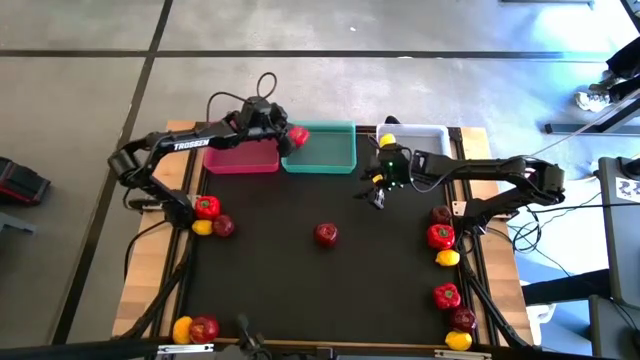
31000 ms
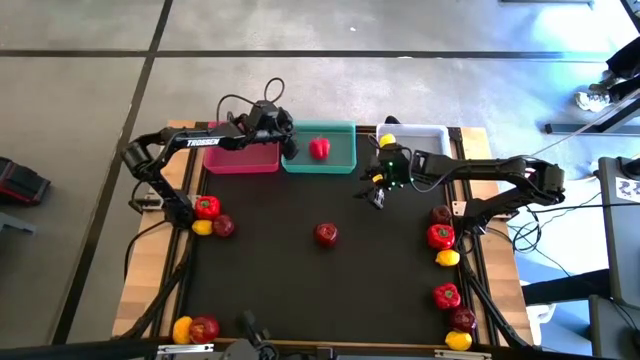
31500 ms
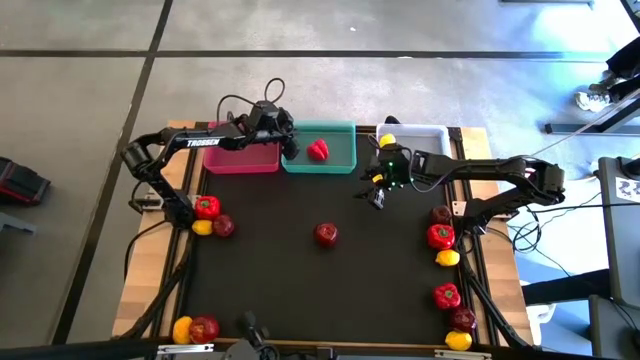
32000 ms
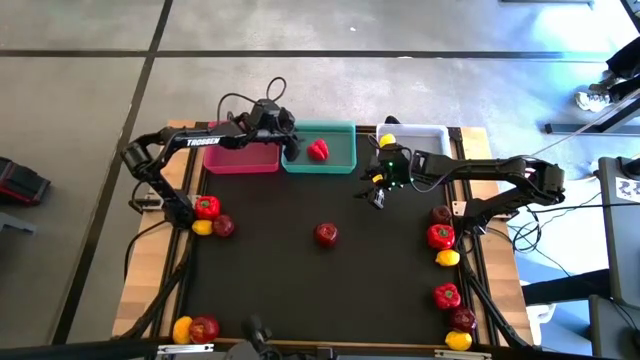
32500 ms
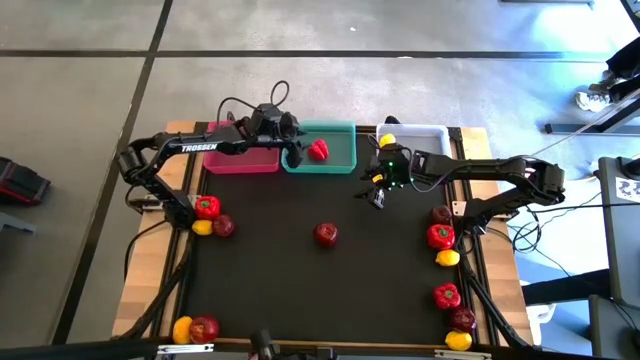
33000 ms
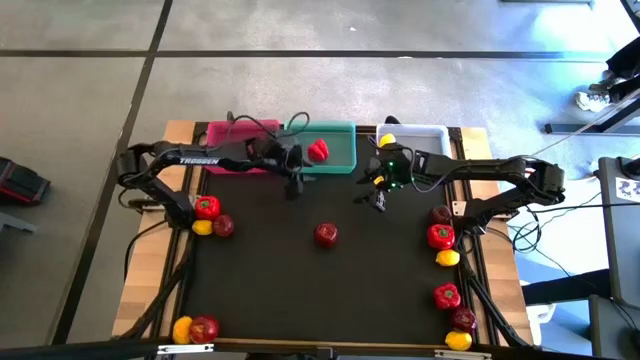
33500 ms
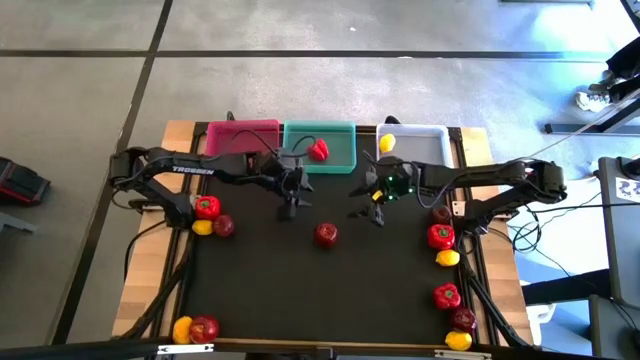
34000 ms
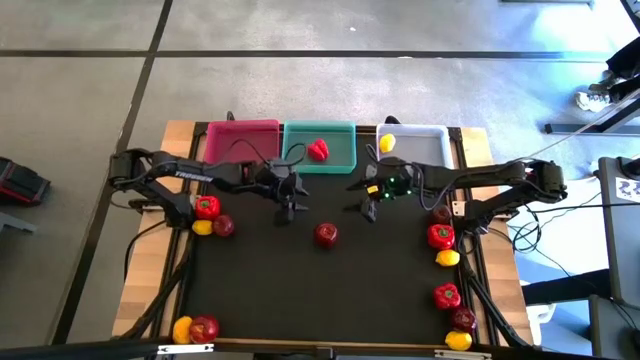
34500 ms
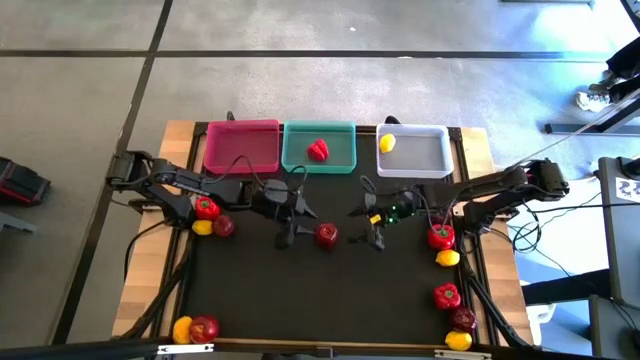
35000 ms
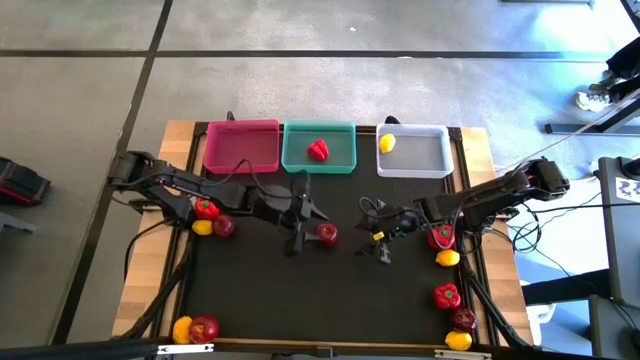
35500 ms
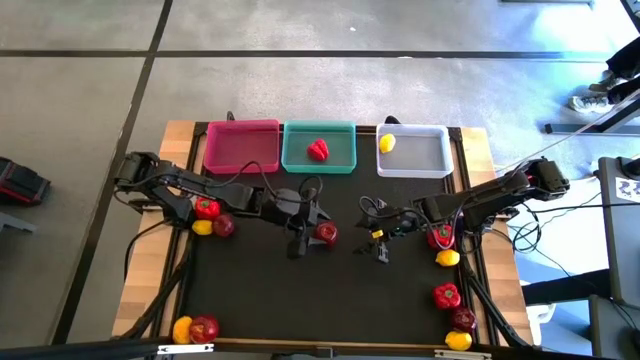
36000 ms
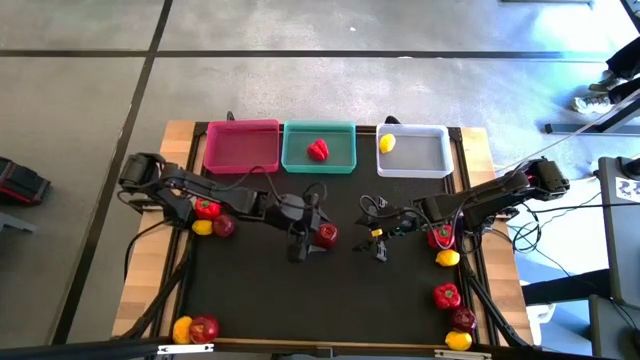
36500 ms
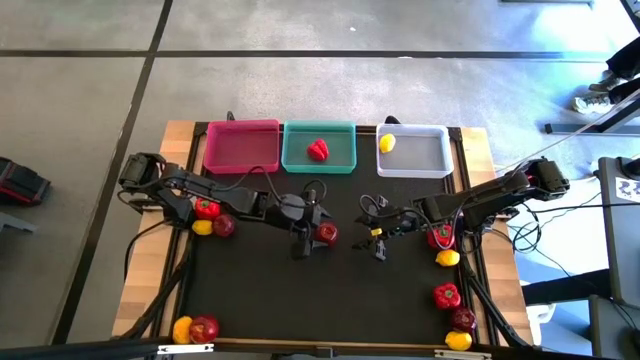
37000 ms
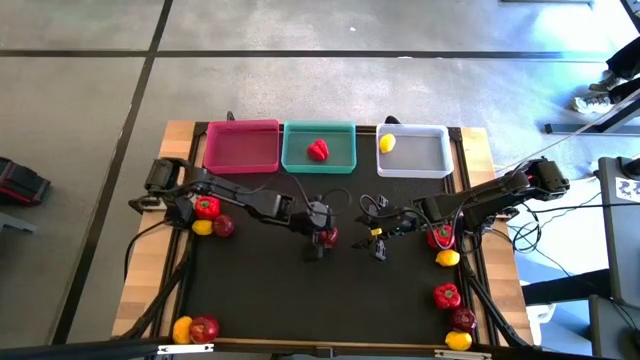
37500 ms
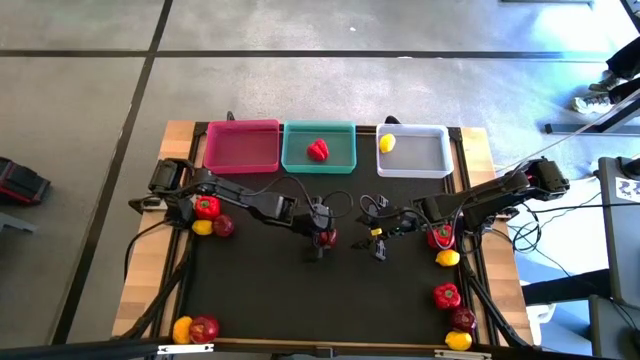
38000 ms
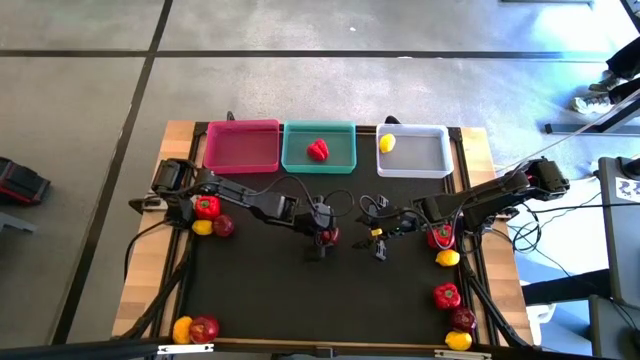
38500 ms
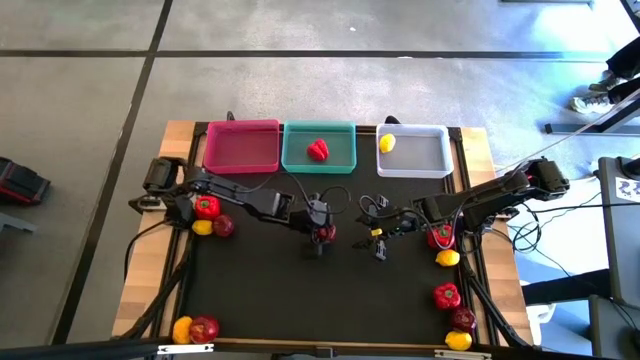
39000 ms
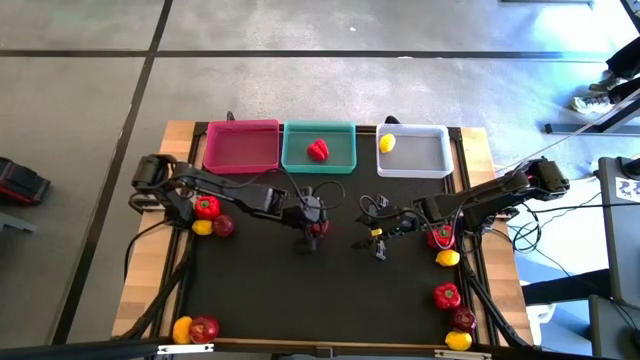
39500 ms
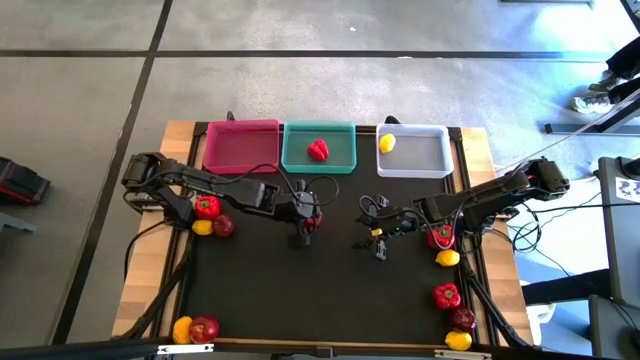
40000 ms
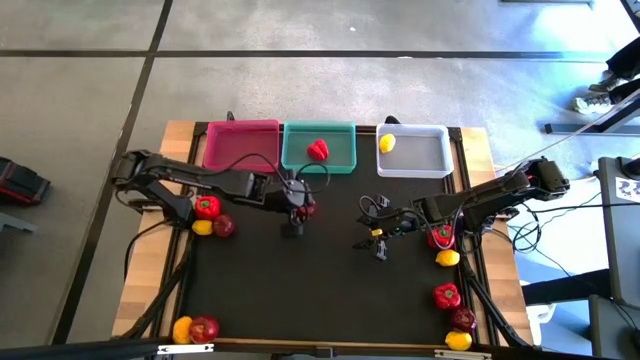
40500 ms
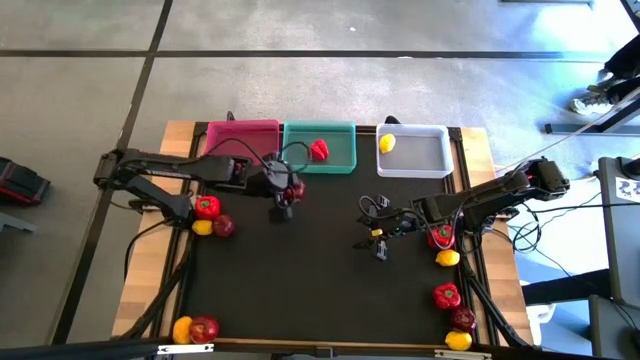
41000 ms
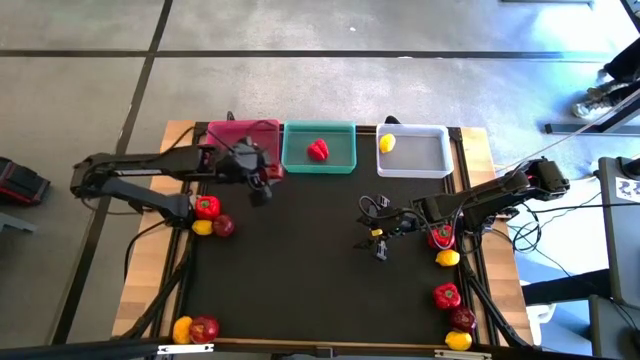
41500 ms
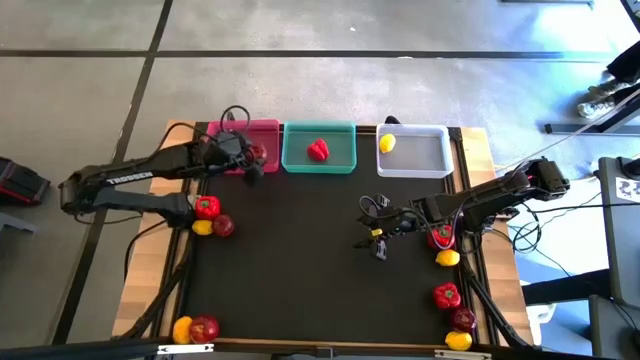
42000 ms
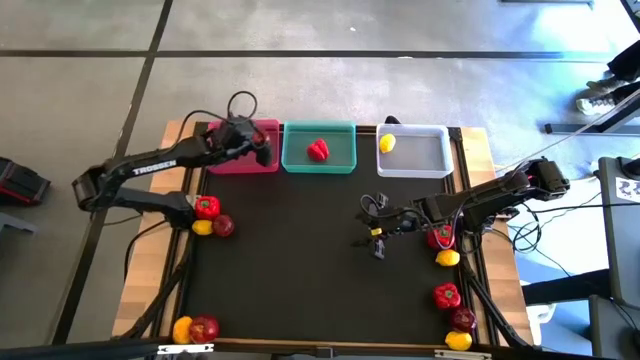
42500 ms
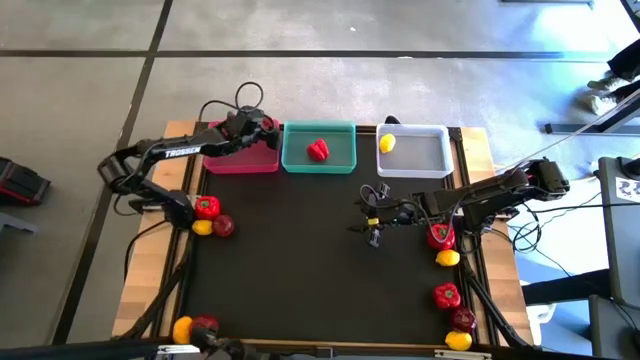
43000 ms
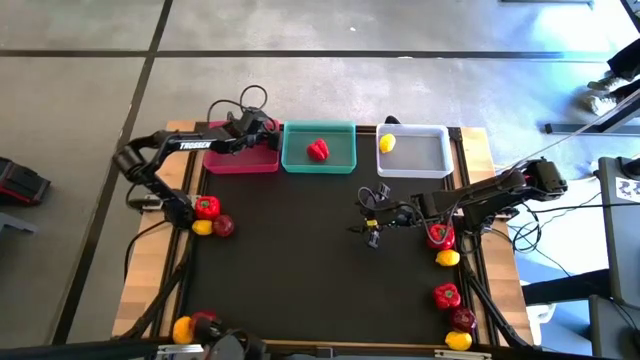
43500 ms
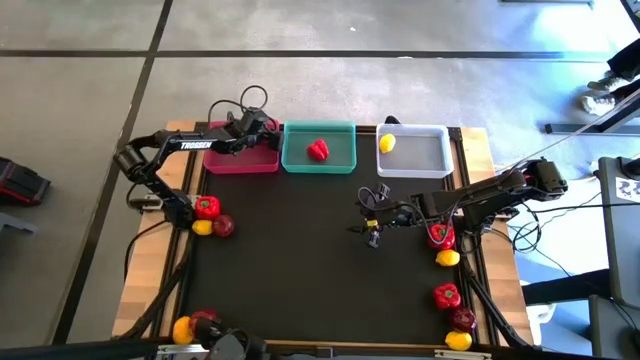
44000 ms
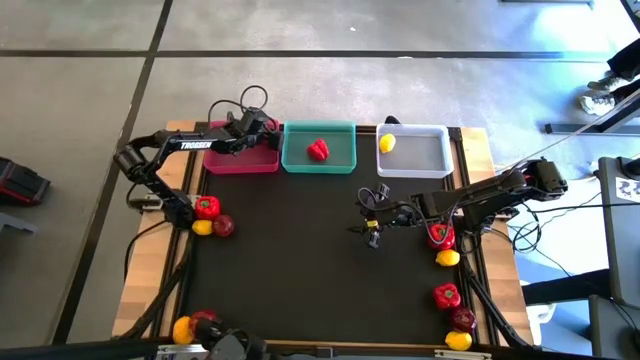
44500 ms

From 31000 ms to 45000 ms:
Task: Sort produce into baskets
Put the apple into the pink bin

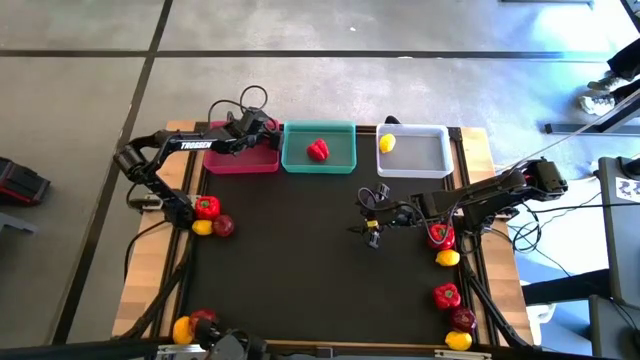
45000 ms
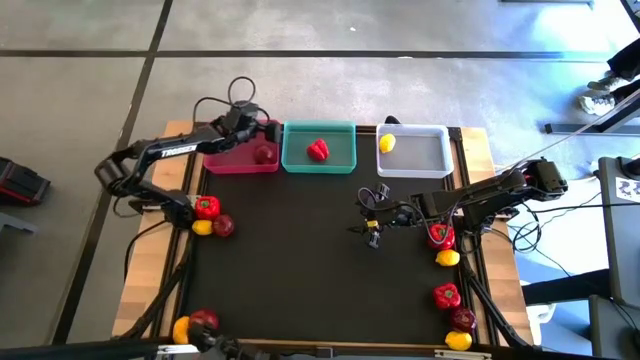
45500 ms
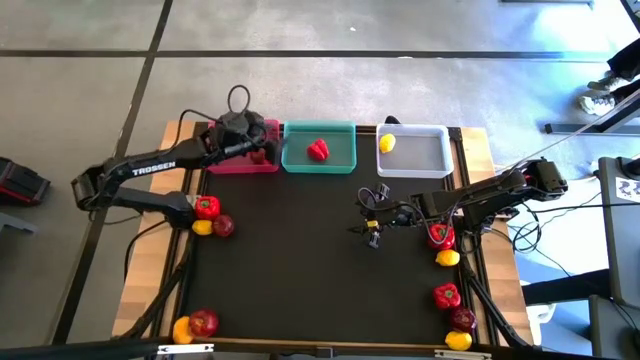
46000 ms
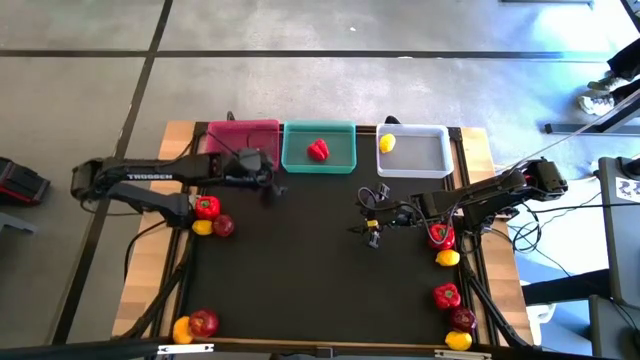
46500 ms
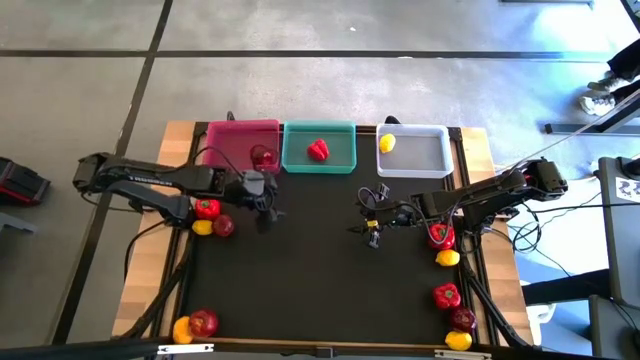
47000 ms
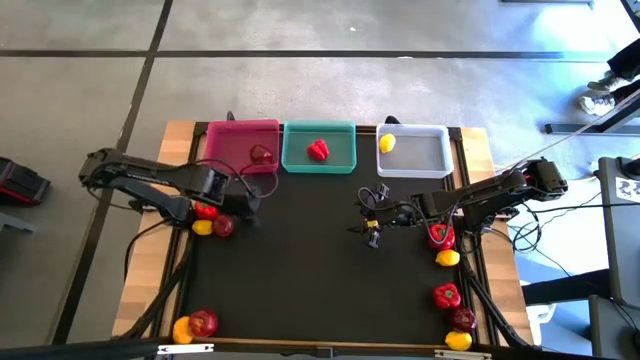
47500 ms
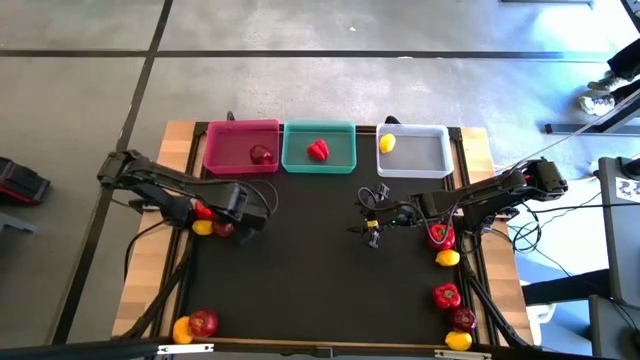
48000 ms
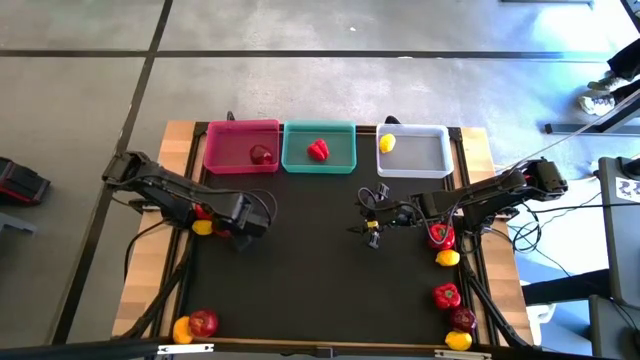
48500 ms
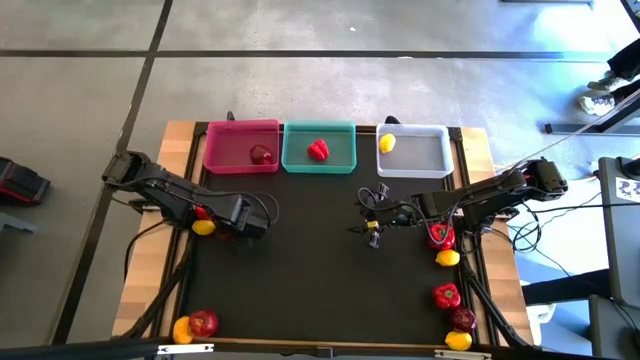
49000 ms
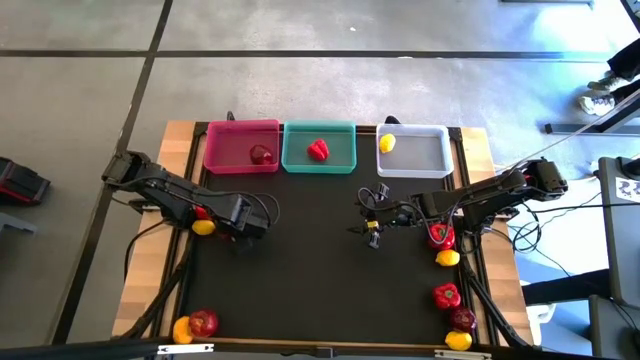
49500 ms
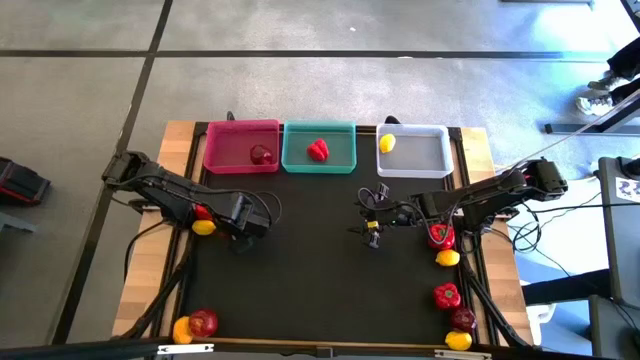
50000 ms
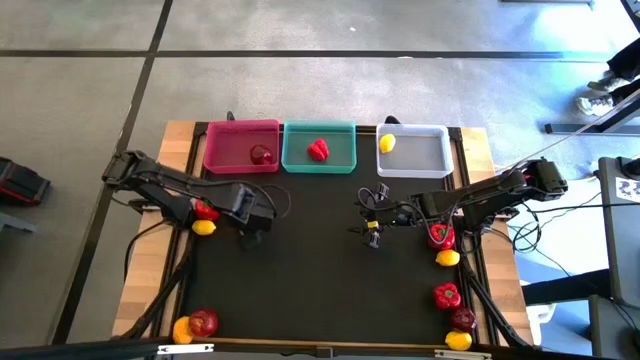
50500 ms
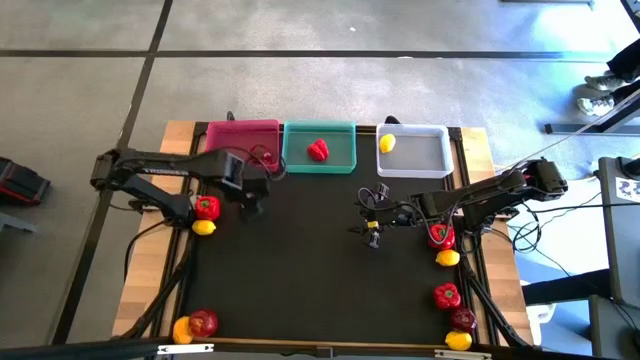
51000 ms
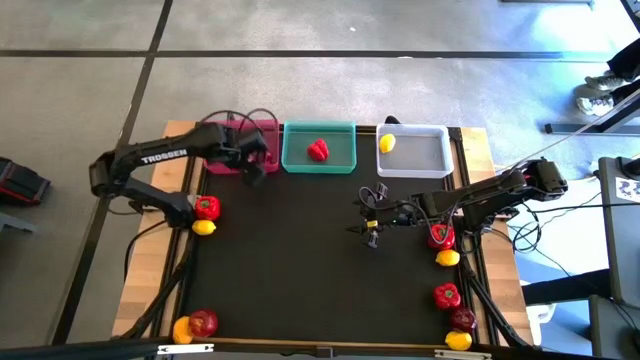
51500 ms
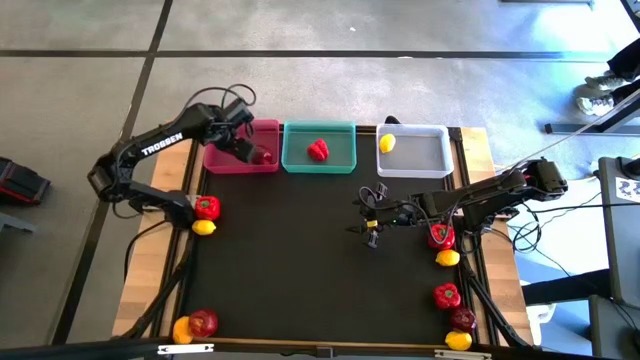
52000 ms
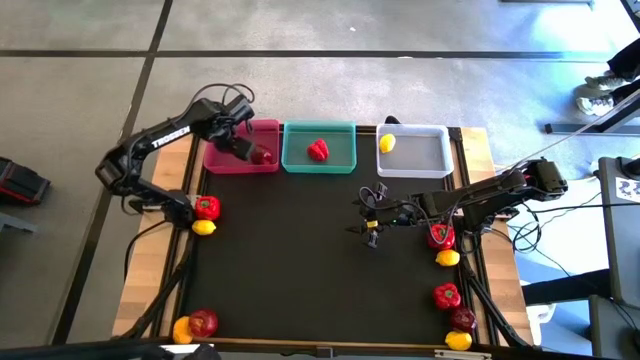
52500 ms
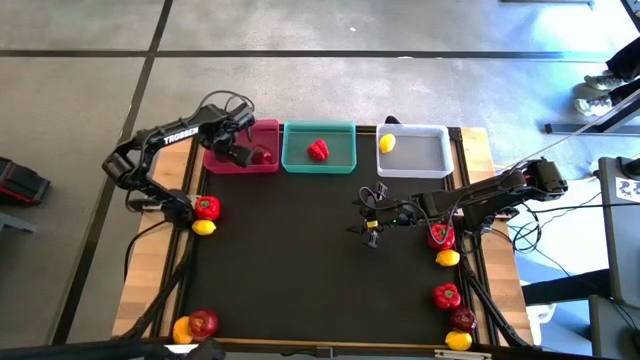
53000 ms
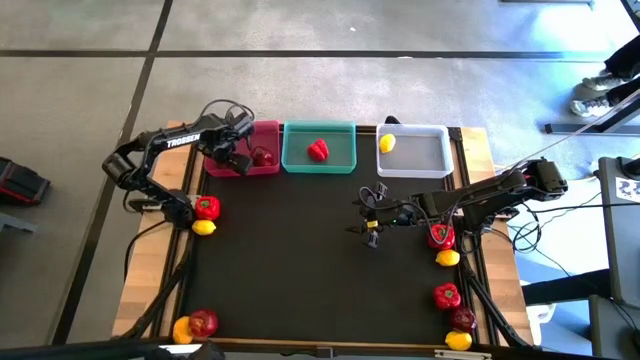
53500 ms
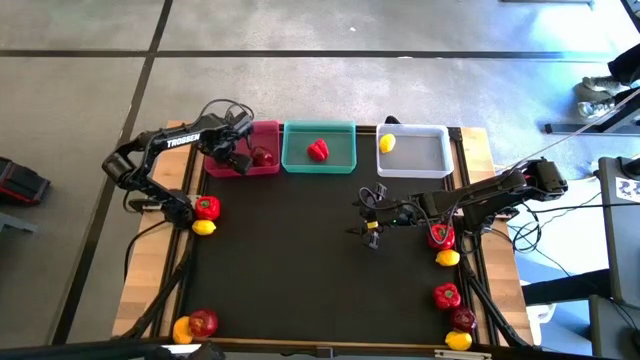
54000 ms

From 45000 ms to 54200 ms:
Put the apple into the pink bin
